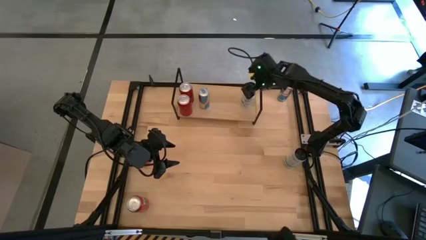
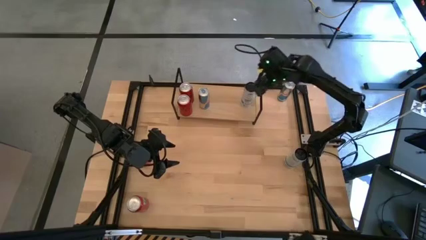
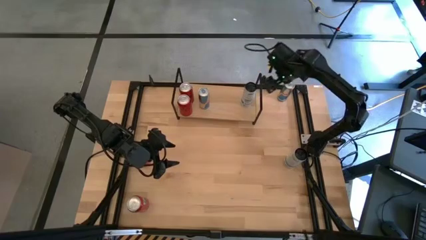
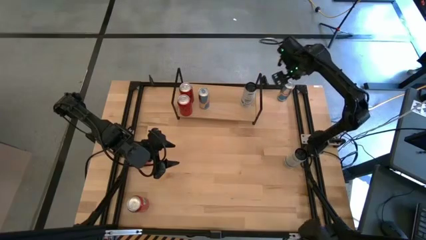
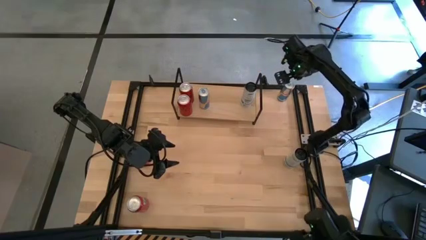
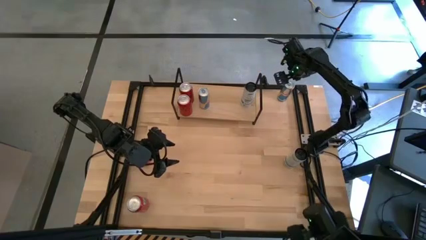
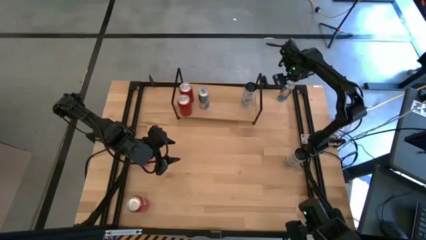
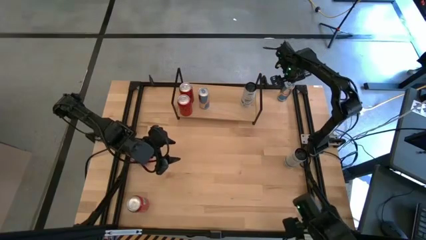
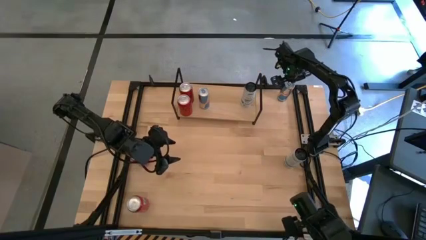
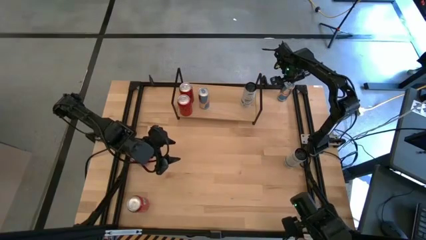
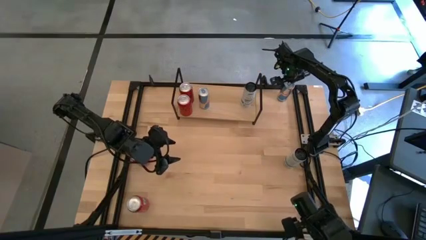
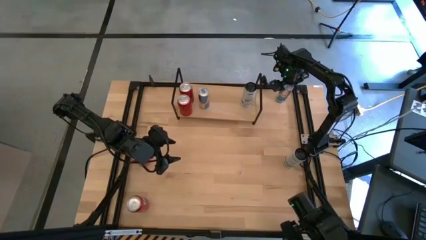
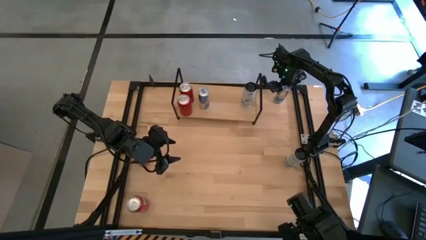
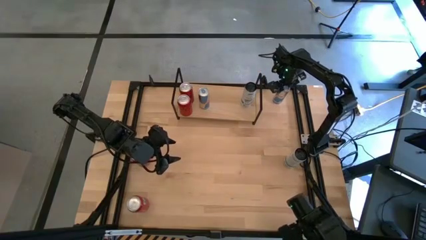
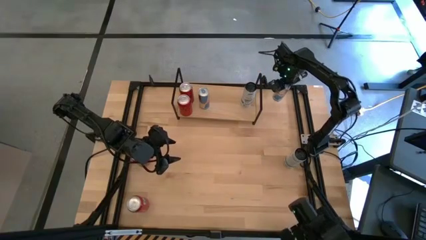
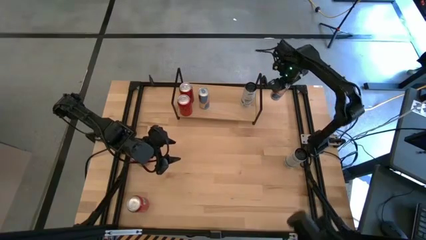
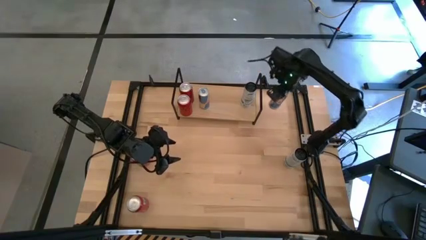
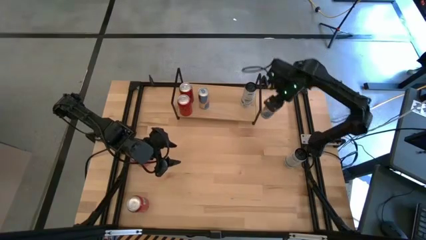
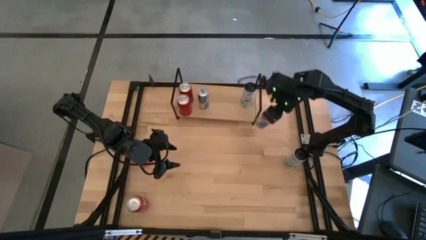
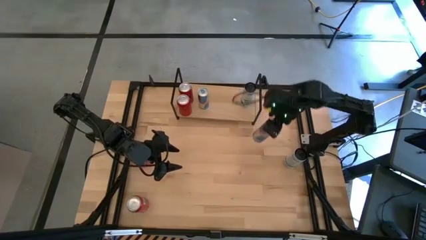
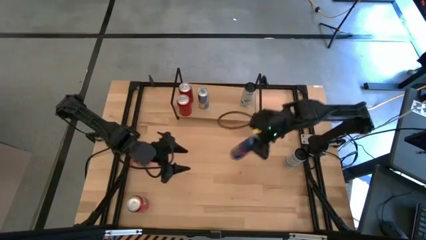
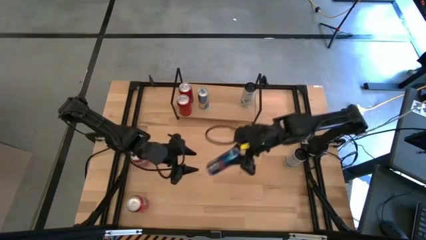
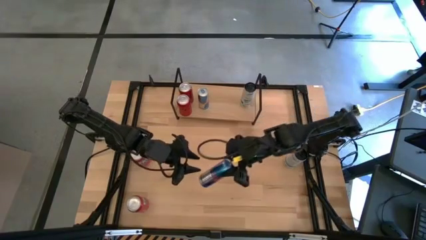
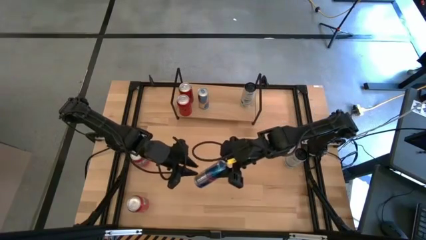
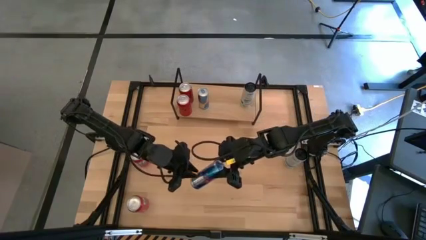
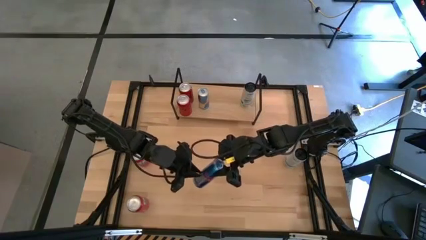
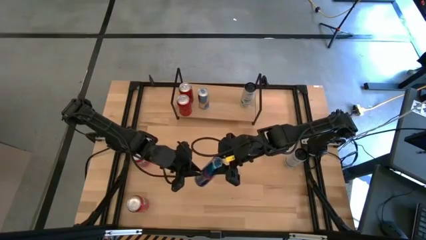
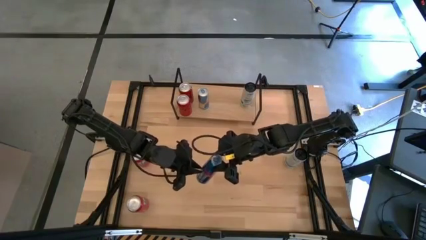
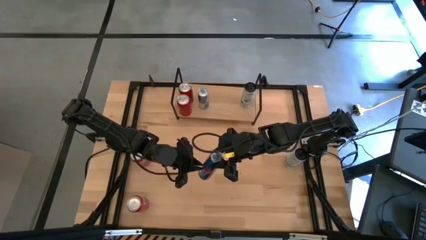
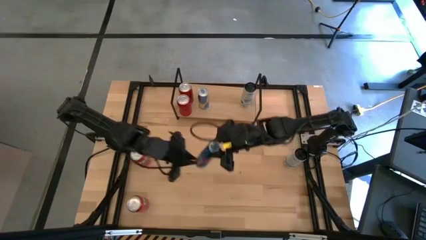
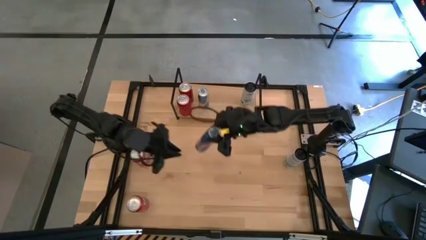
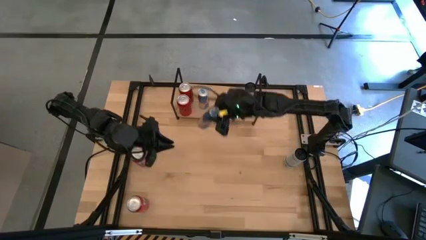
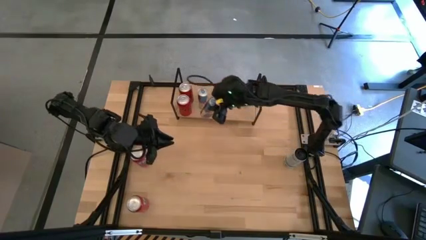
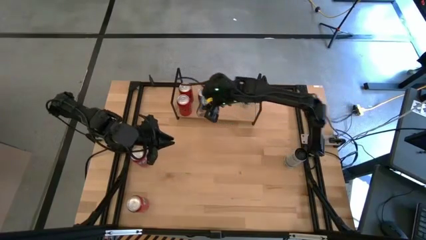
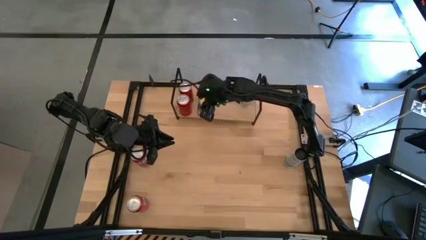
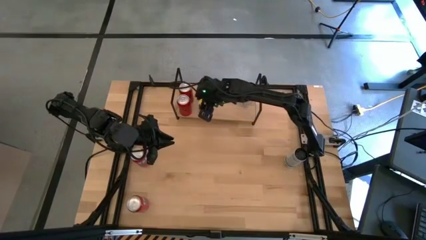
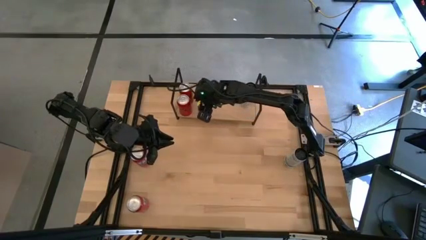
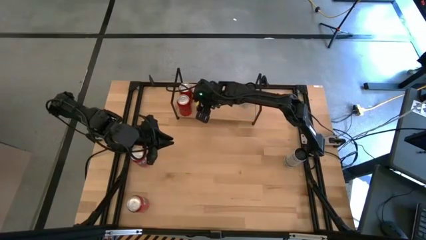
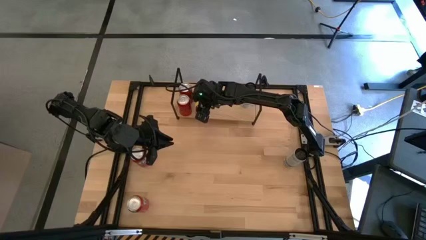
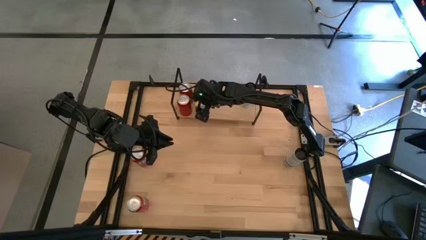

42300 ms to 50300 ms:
Task: Place canned beverage on shelf
Put the blue soda can on the shelf aligned with the other blue soda can

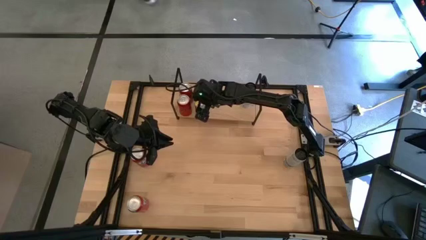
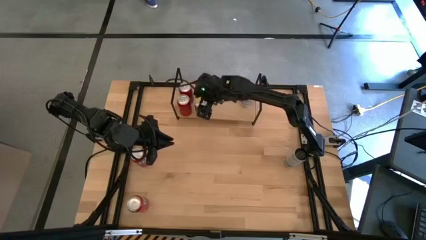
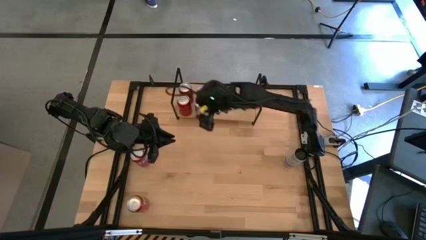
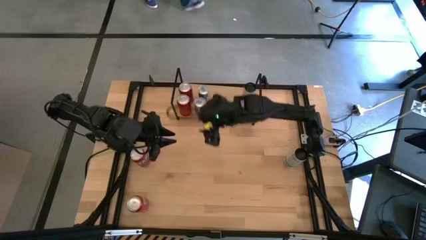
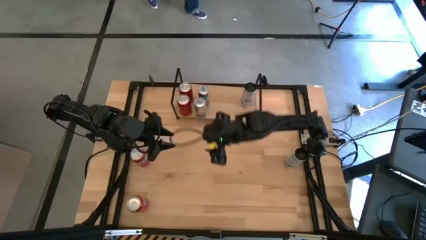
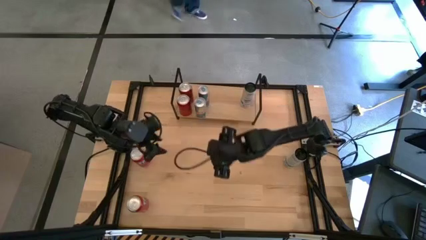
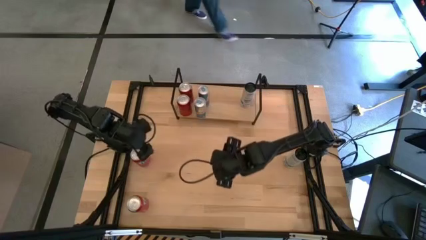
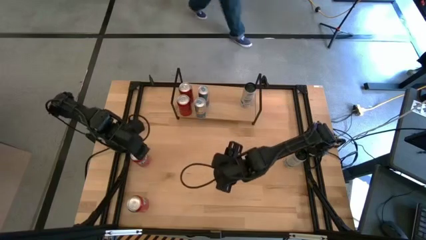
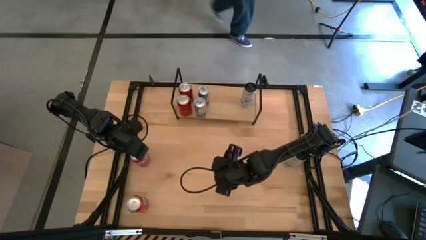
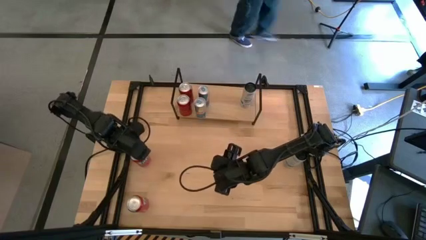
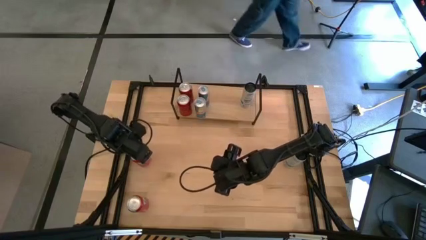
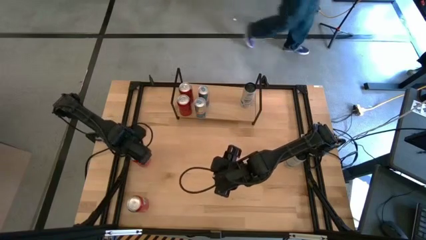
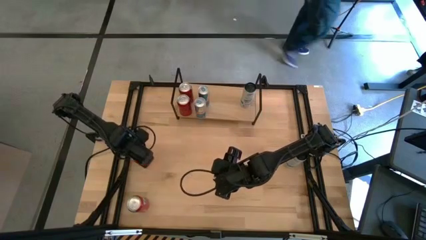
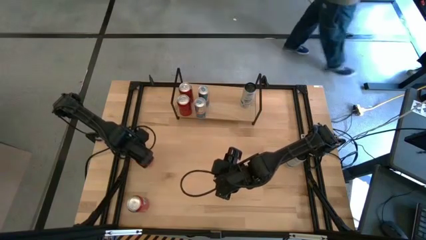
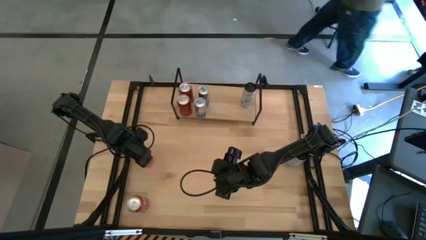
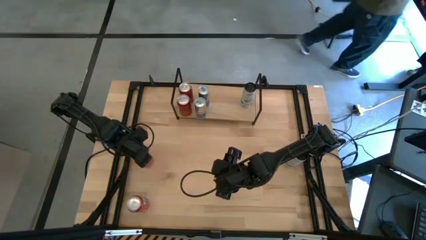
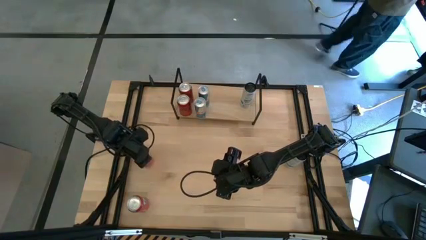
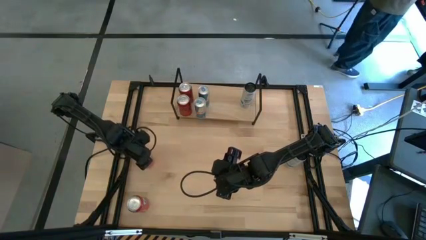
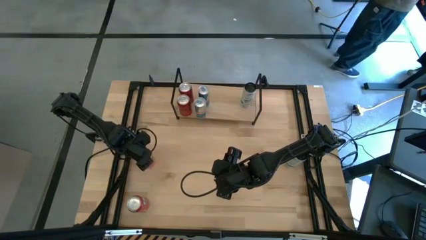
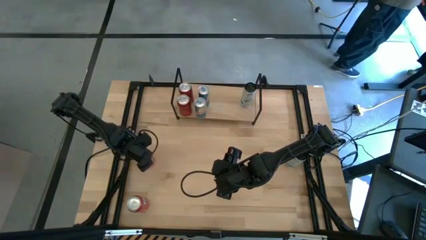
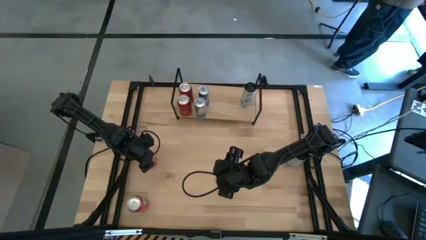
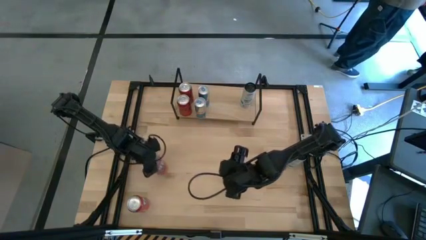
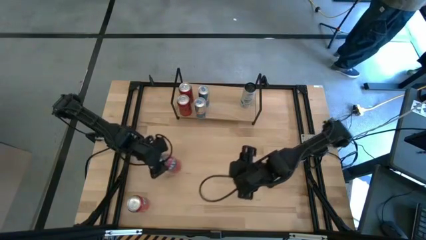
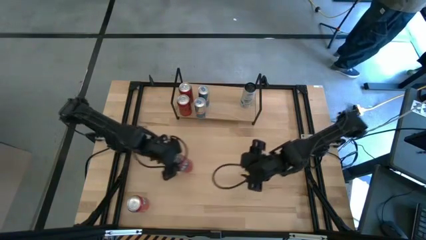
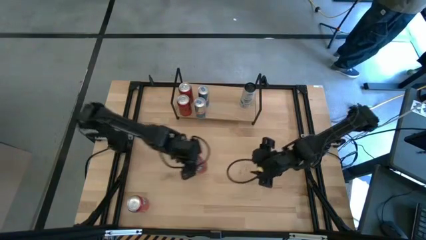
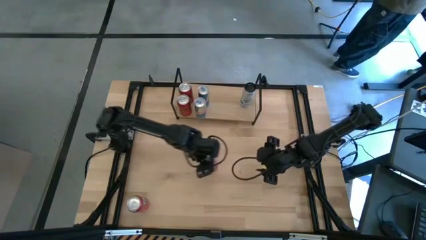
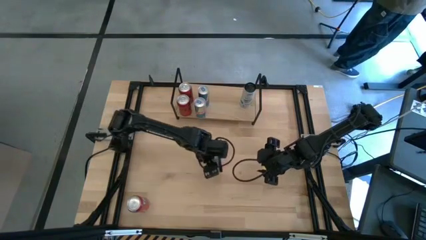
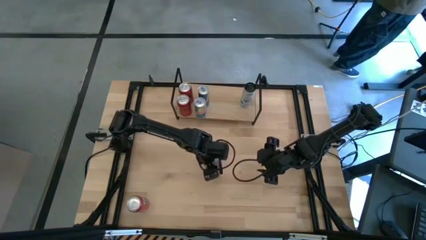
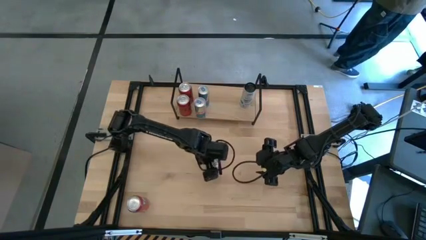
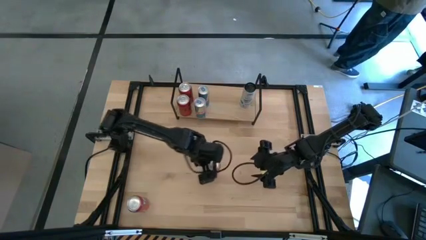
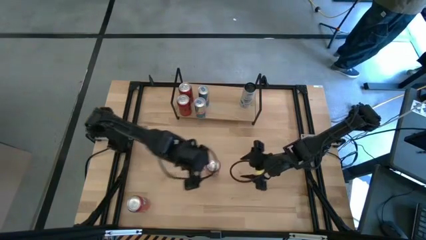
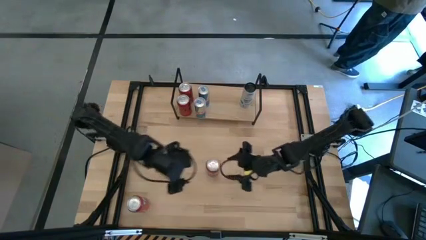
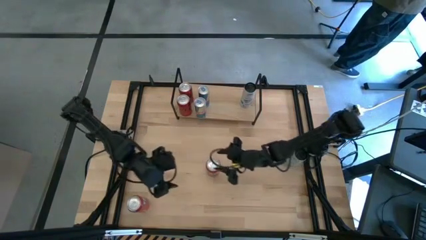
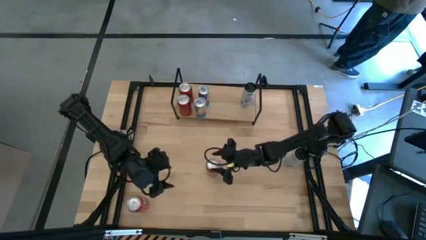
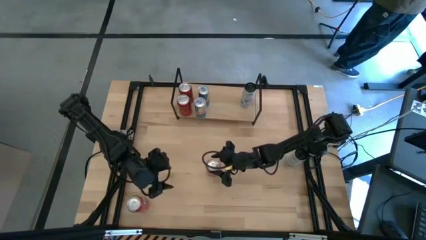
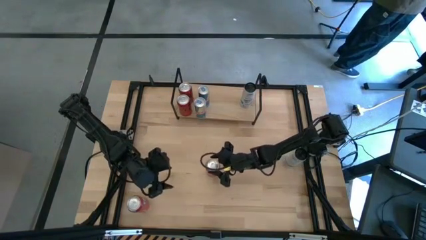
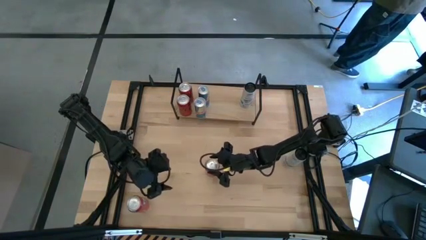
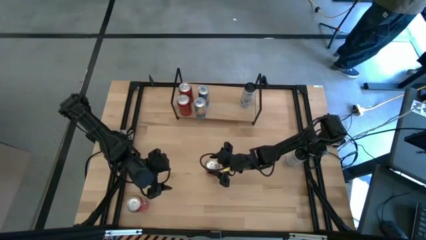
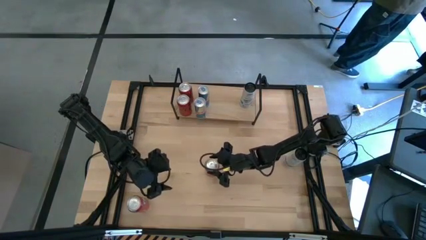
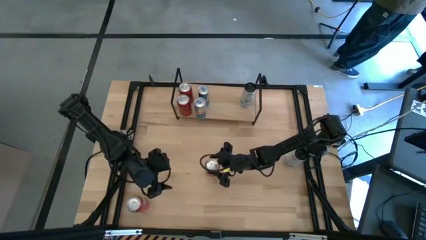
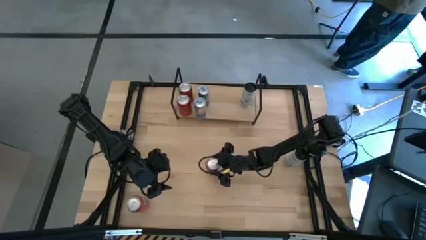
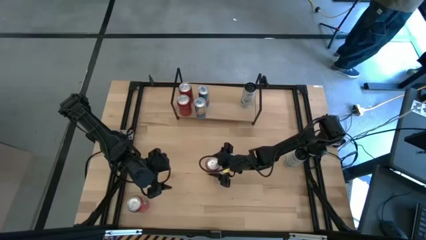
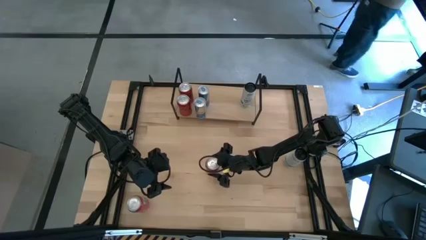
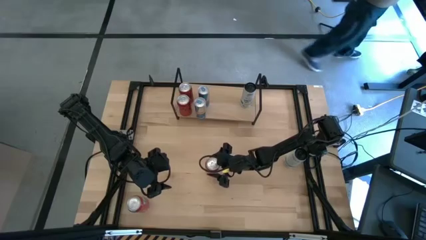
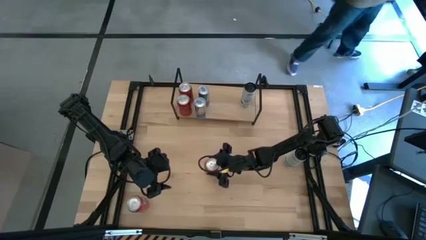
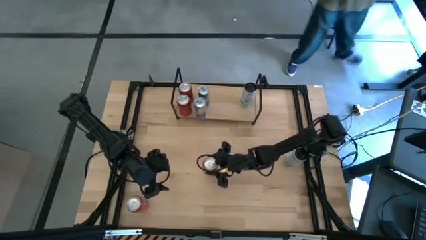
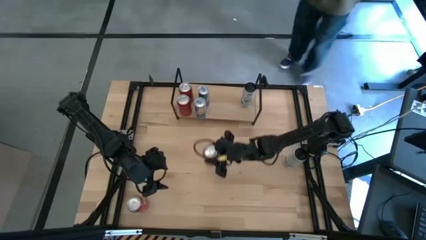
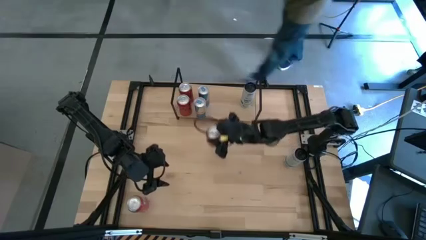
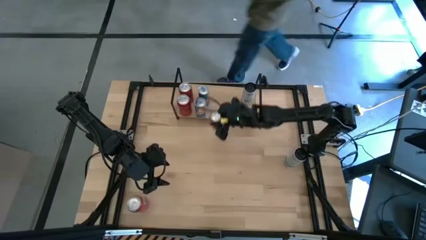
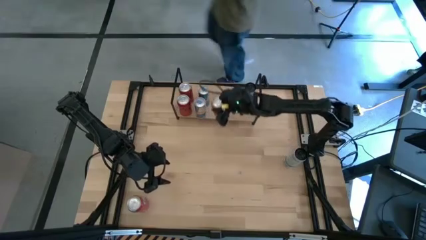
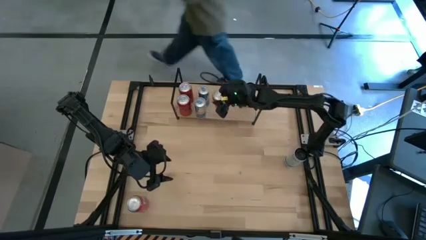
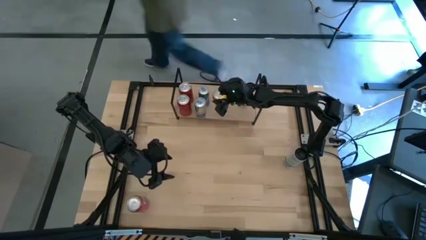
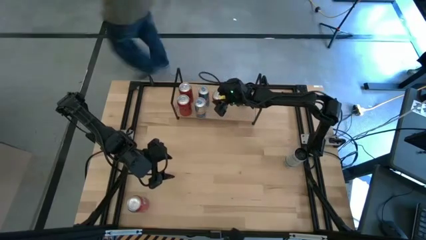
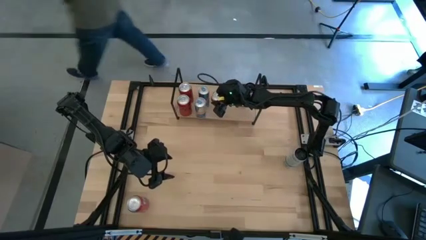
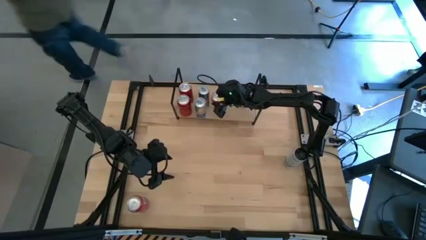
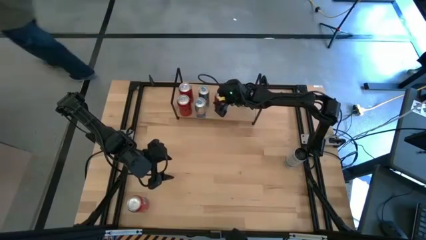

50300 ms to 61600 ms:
Put the top red soda can on the shelf
